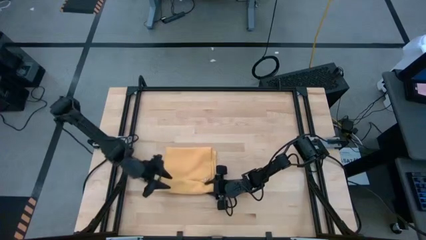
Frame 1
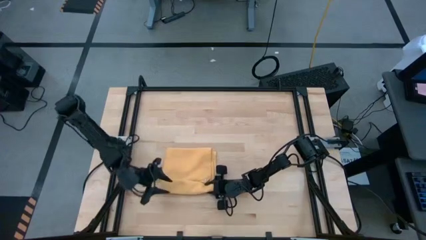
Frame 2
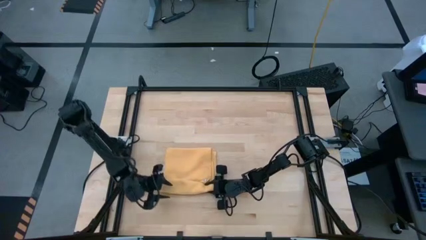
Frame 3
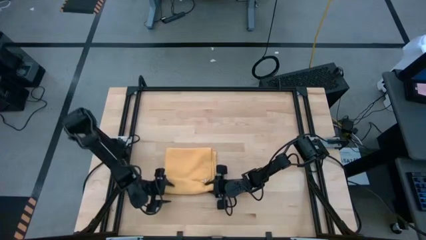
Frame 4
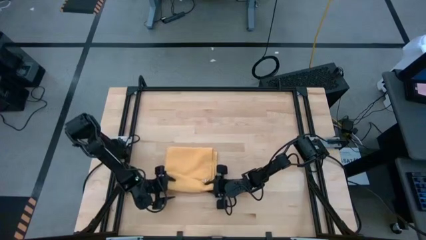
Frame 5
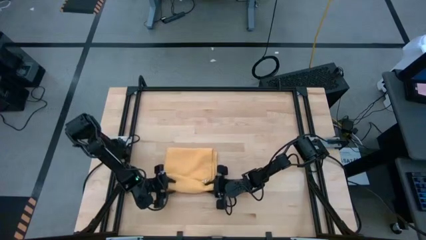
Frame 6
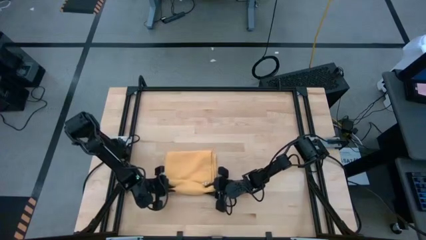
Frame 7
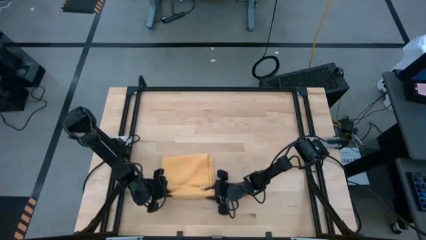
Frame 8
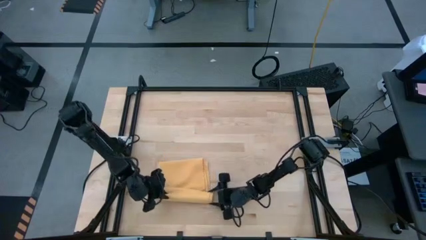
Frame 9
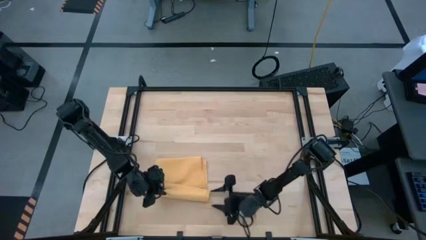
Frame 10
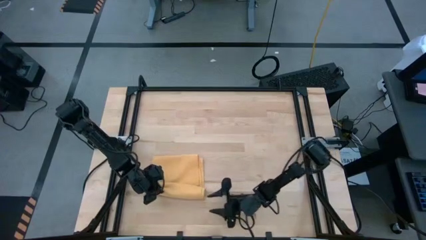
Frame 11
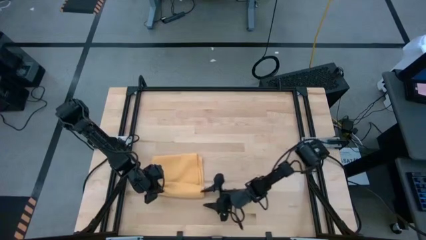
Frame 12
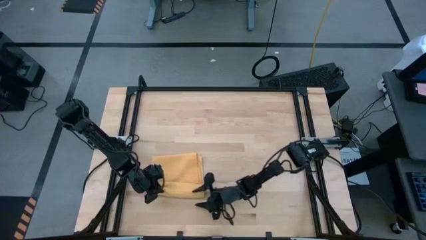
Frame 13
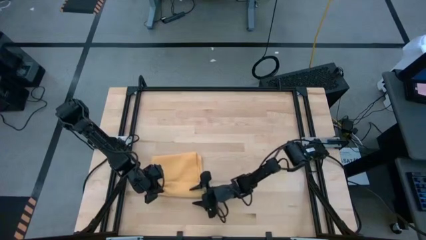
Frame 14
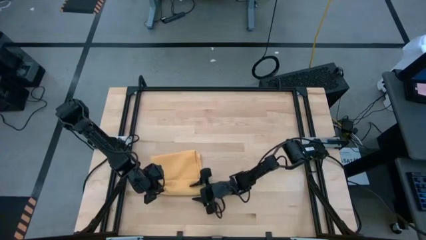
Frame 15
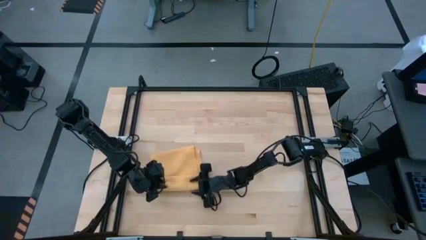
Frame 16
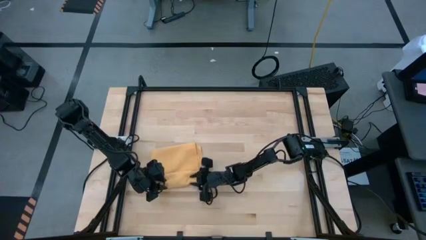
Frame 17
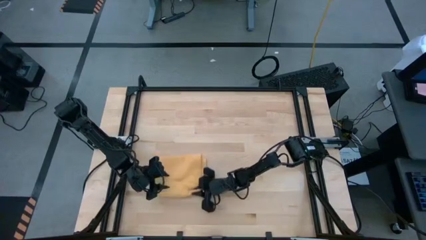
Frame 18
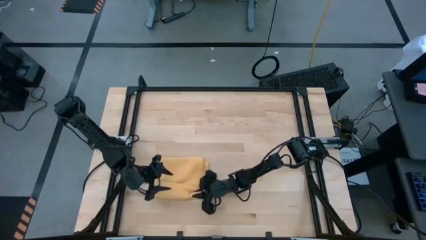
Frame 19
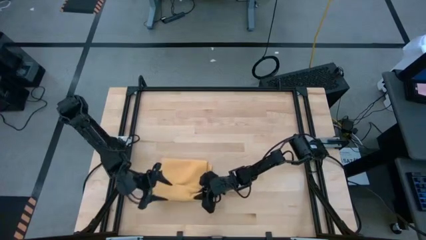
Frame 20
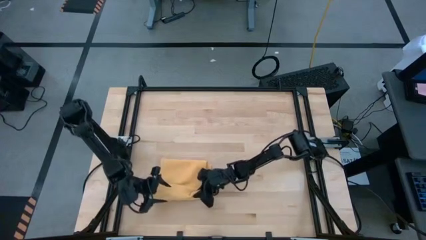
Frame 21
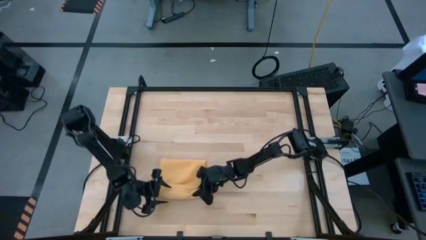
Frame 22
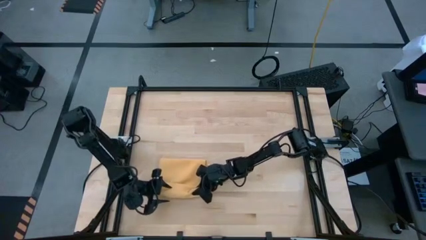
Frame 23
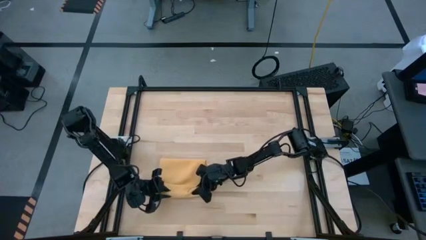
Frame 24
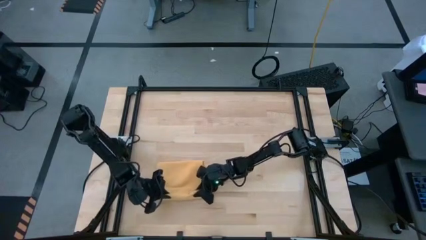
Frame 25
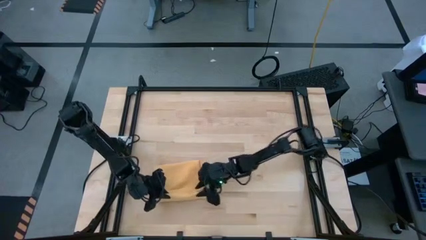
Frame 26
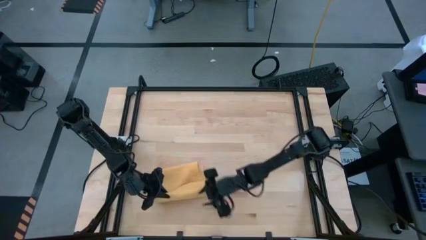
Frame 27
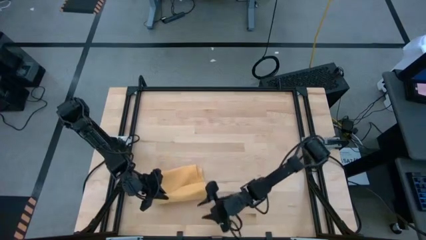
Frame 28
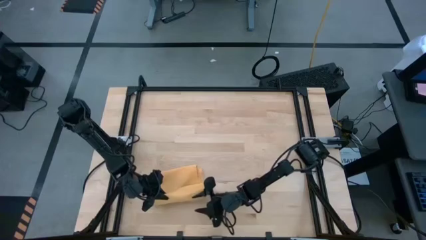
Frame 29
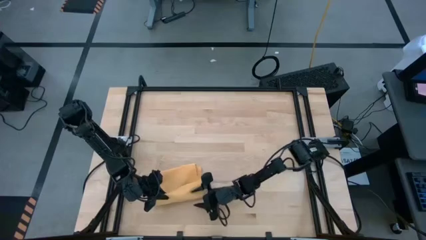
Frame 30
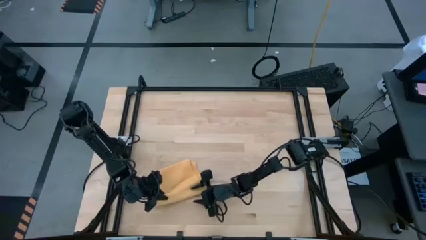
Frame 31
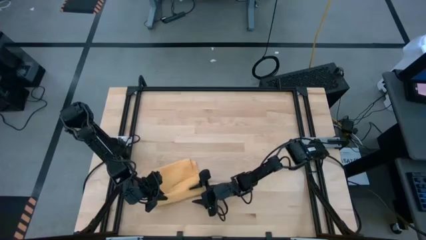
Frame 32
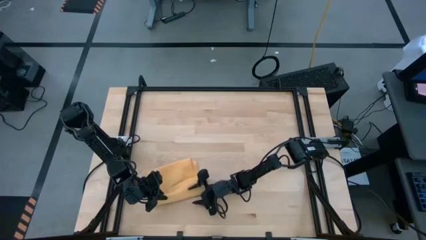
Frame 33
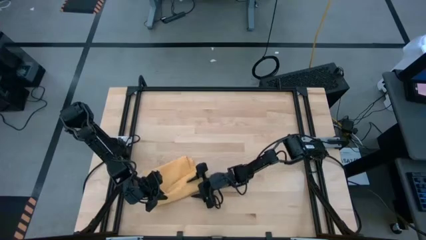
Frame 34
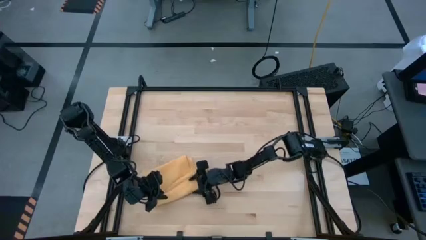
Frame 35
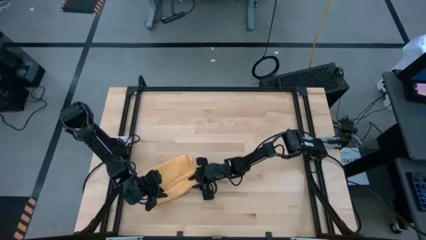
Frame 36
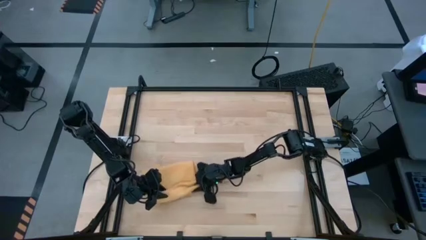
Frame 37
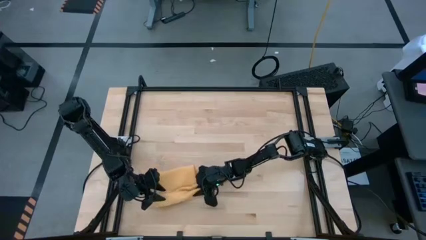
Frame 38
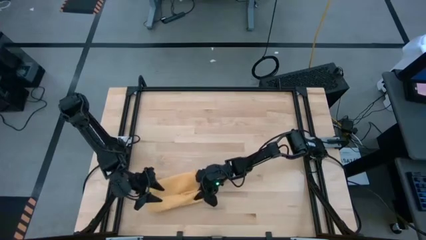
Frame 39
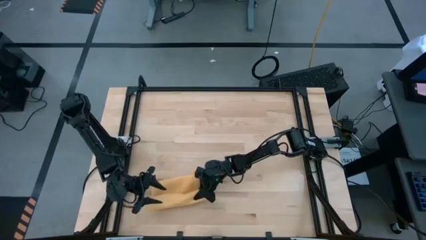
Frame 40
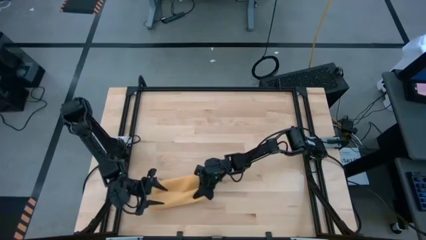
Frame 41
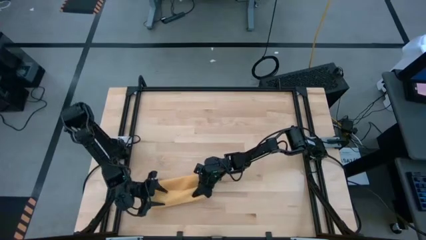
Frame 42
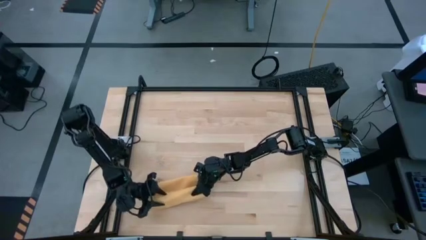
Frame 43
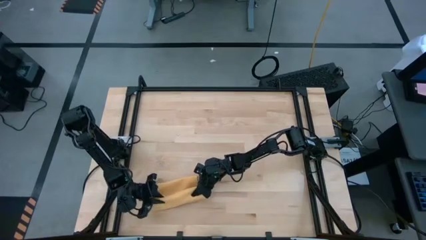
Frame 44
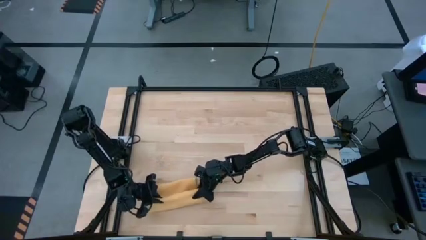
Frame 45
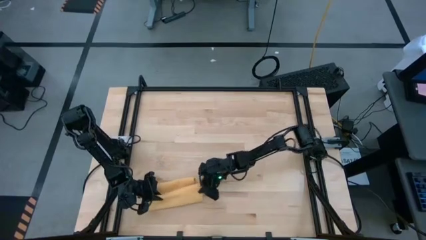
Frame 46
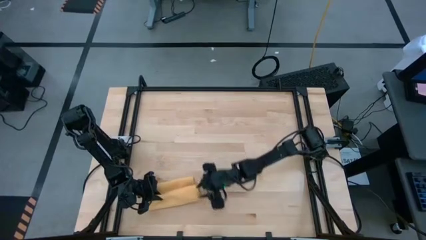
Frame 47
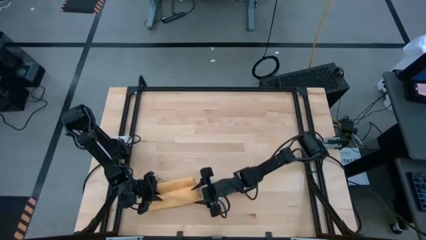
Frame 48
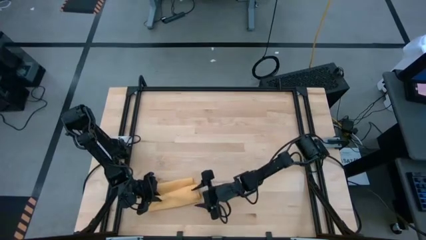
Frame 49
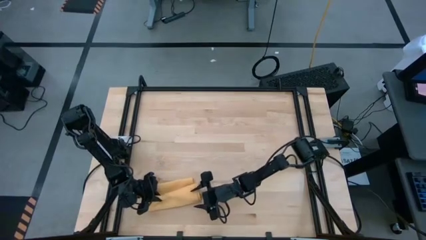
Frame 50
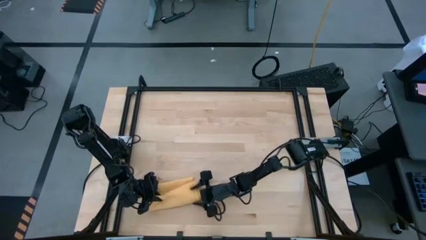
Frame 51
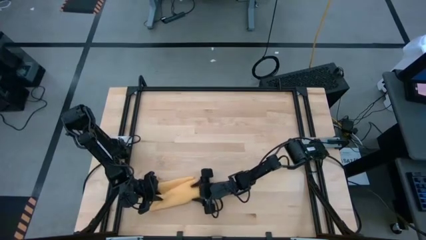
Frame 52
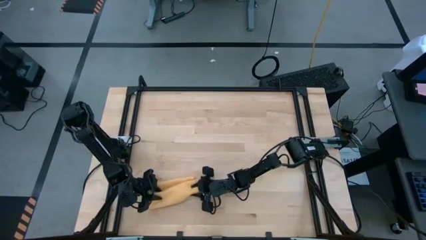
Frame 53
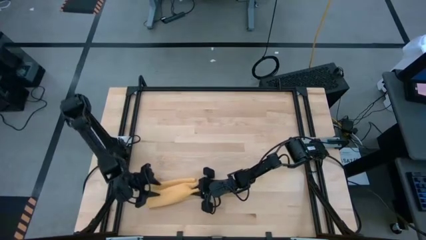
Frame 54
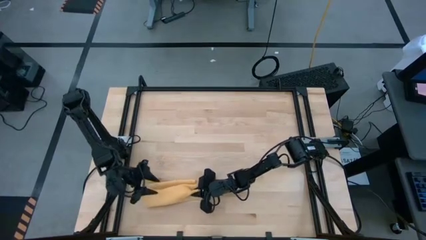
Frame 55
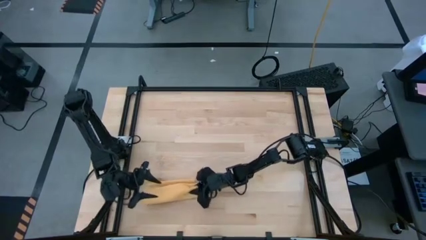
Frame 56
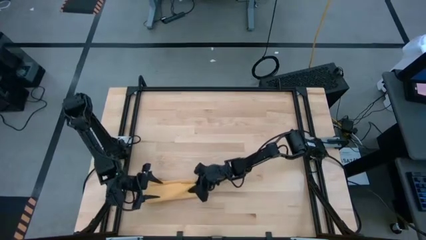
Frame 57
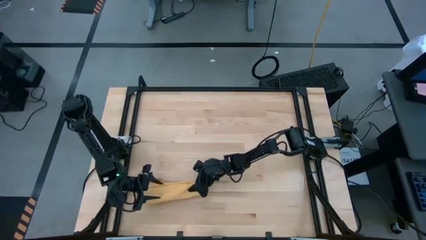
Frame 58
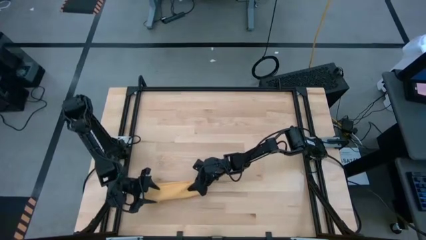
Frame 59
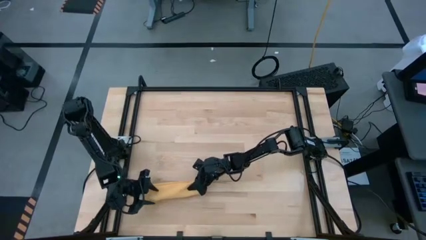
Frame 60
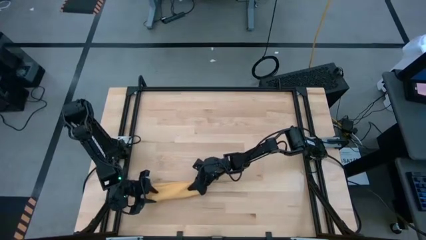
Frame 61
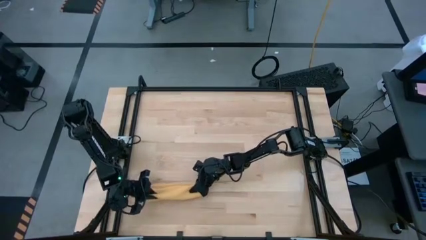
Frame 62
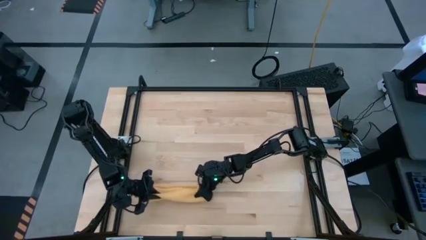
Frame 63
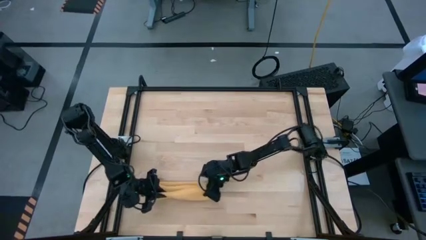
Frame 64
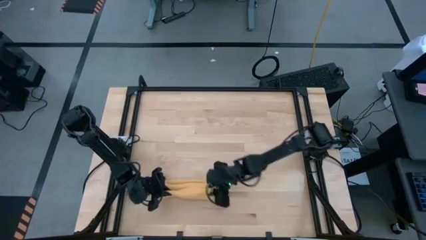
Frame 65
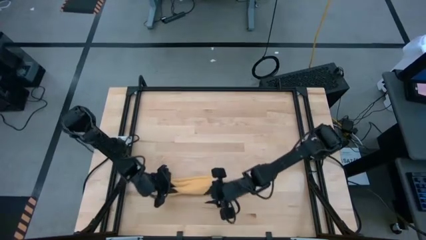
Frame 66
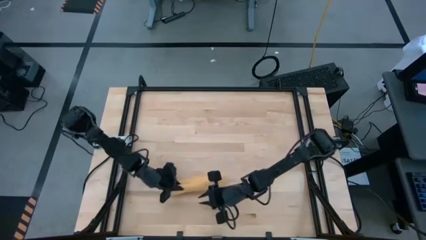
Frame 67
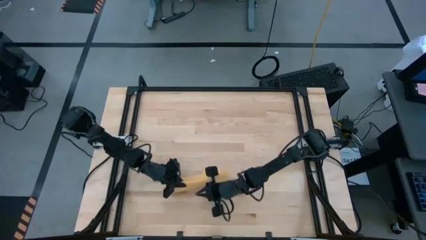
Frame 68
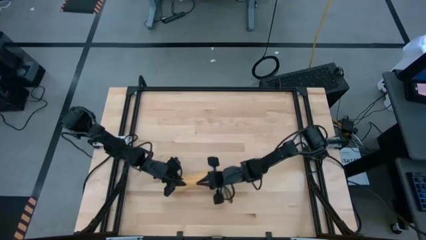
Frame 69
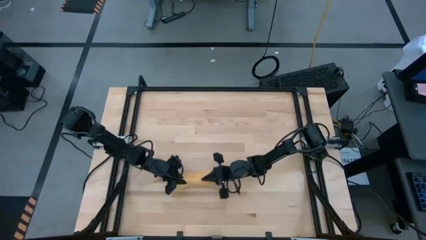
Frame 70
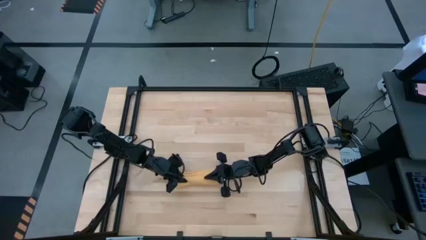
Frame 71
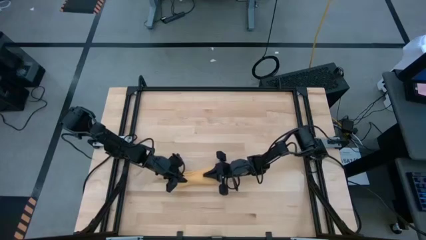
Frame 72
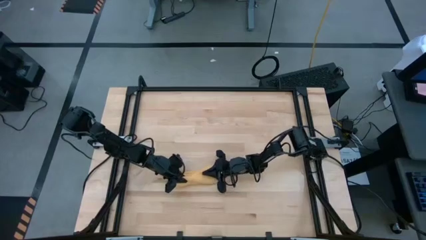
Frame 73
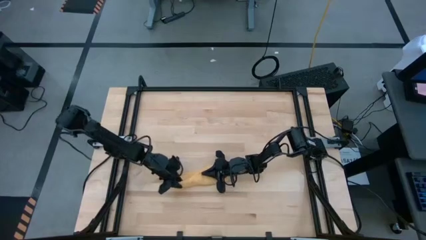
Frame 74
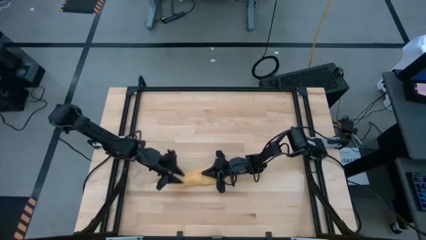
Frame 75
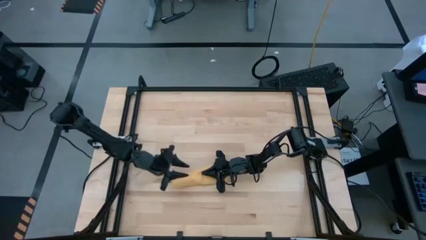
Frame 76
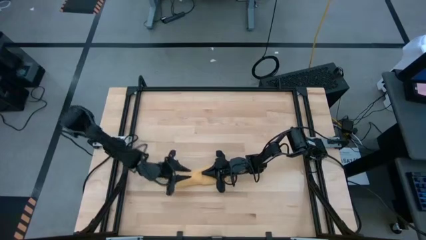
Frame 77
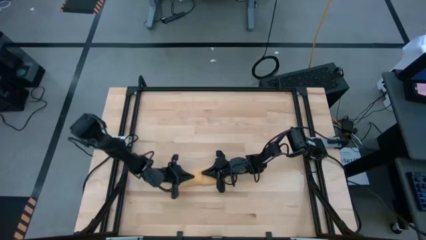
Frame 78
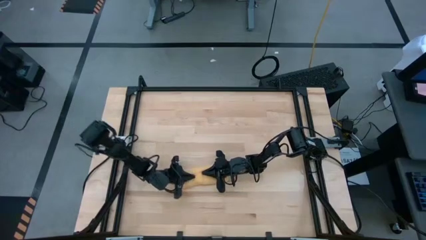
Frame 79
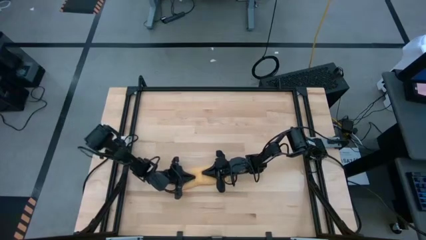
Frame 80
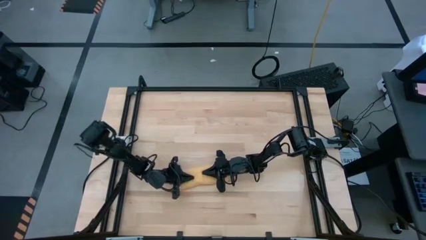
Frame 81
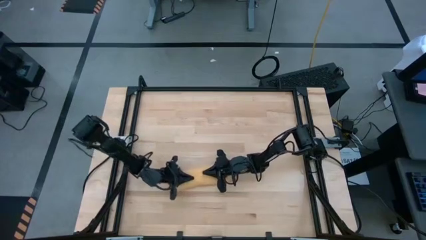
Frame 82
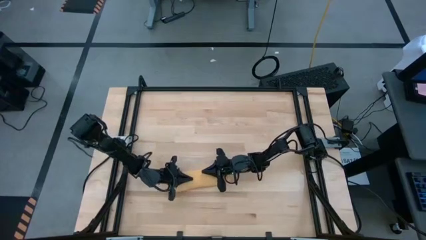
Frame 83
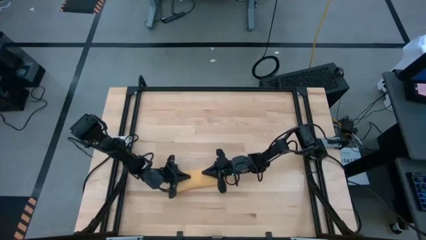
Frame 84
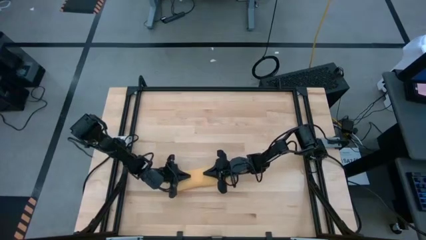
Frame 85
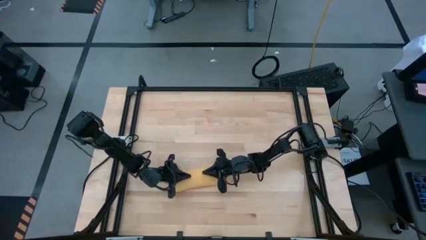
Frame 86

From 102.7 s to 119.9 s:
Task: Roll towel
Roll the yellow towel
